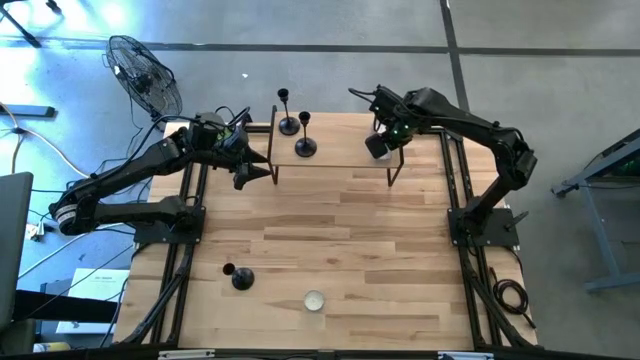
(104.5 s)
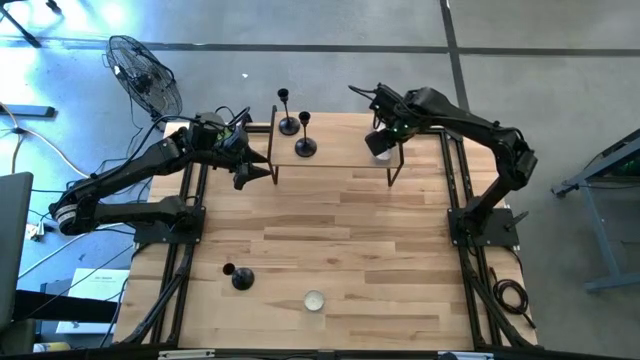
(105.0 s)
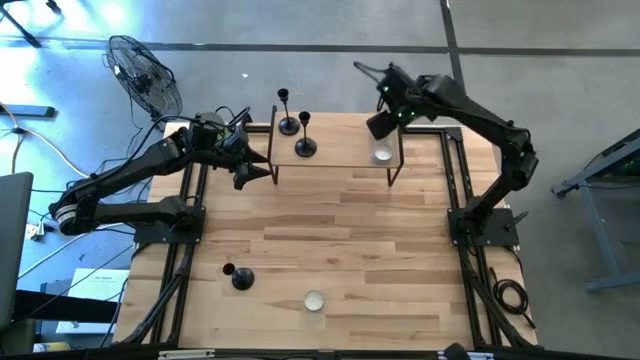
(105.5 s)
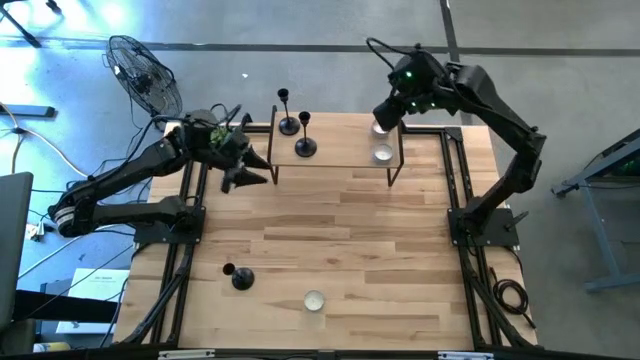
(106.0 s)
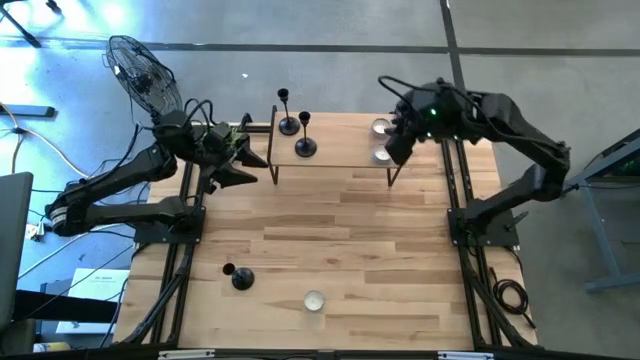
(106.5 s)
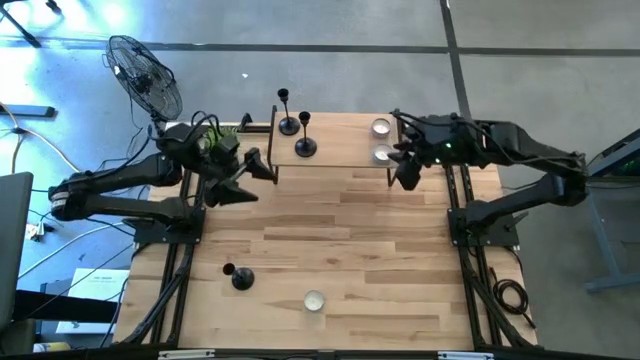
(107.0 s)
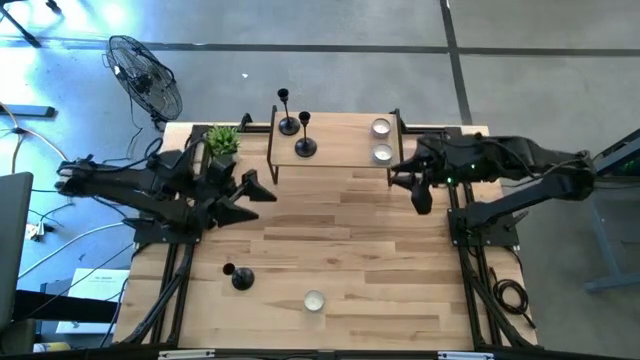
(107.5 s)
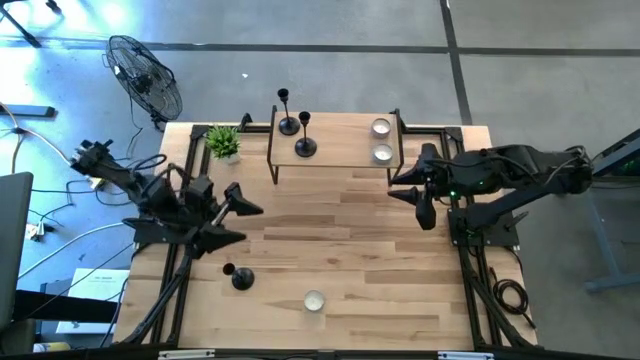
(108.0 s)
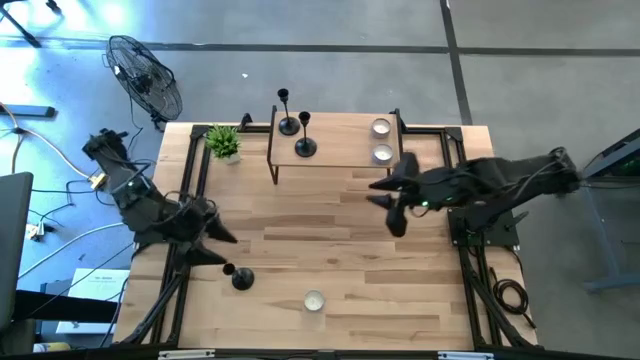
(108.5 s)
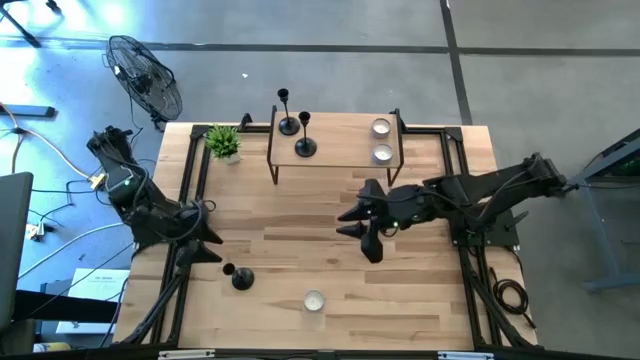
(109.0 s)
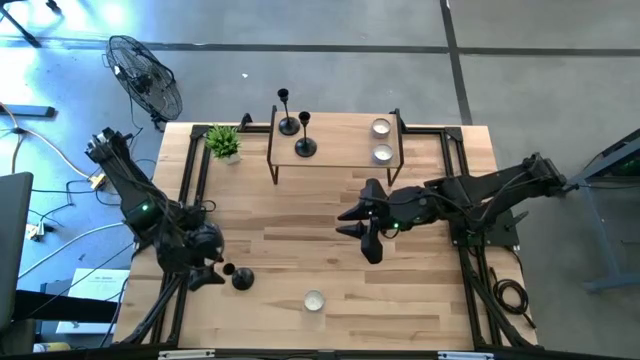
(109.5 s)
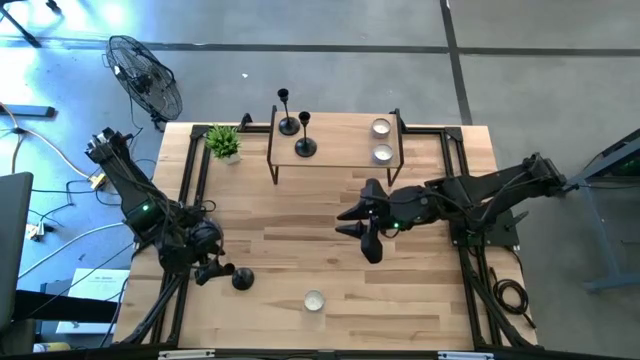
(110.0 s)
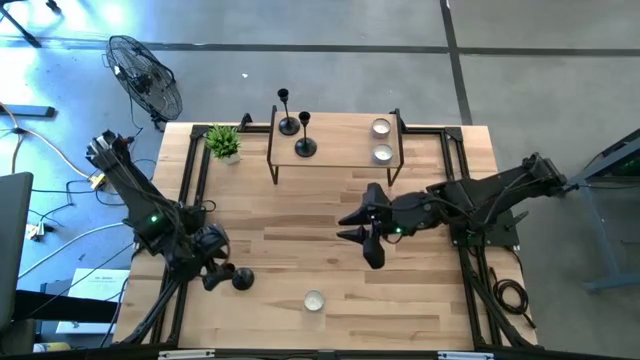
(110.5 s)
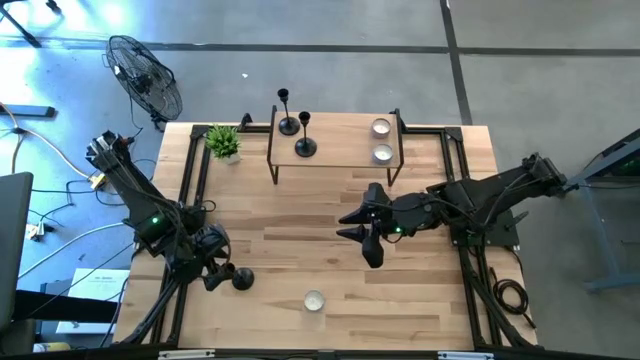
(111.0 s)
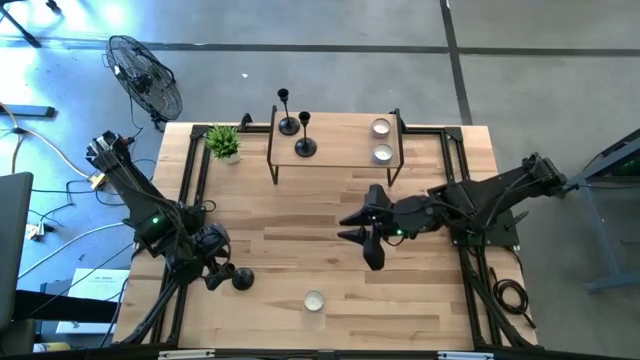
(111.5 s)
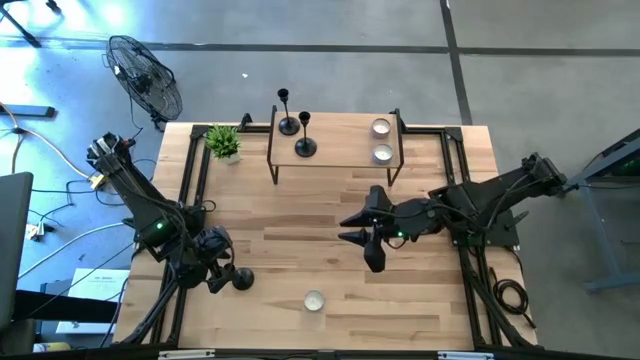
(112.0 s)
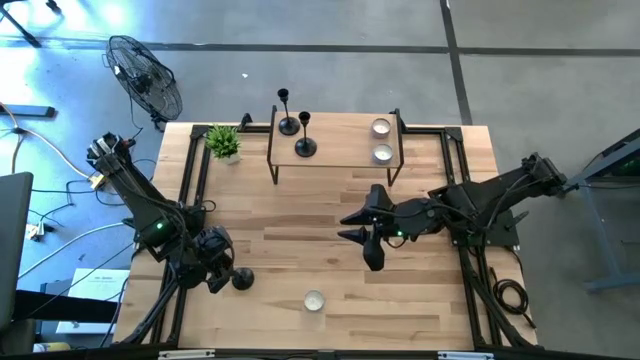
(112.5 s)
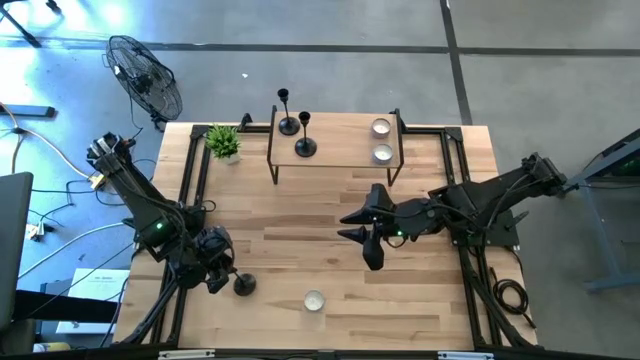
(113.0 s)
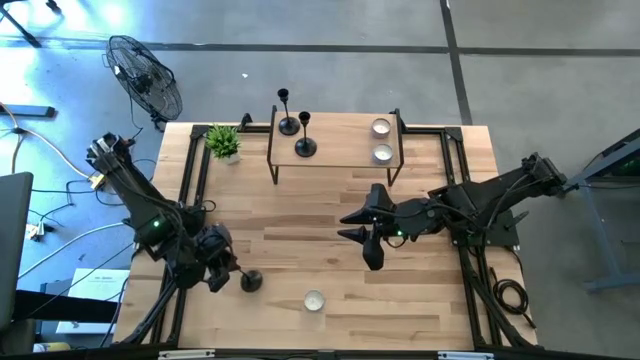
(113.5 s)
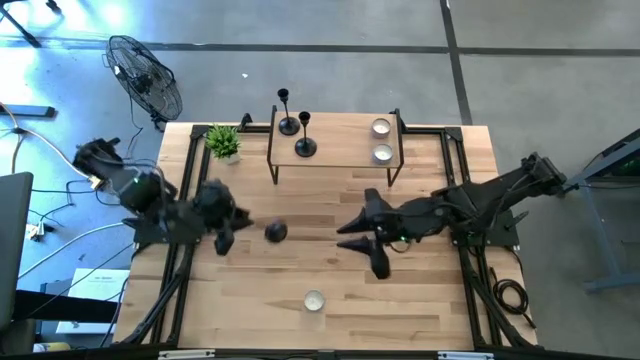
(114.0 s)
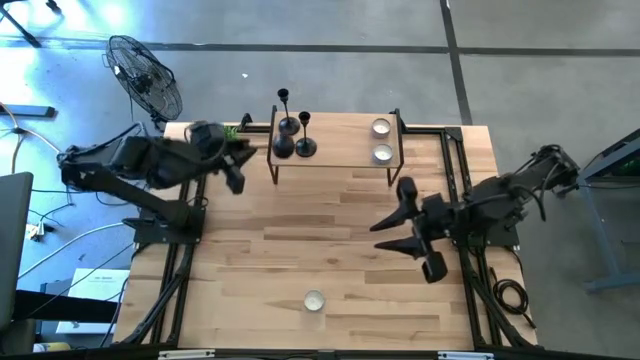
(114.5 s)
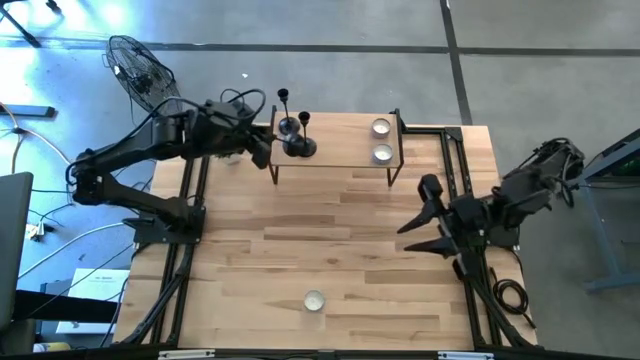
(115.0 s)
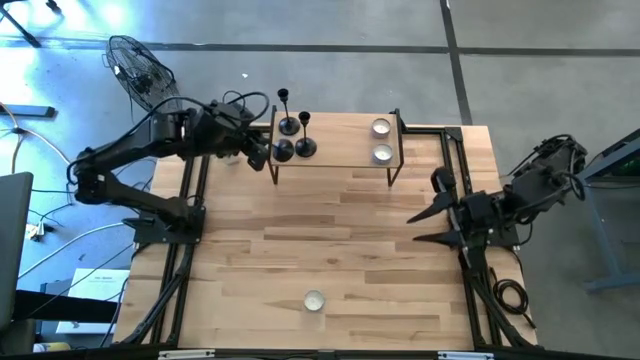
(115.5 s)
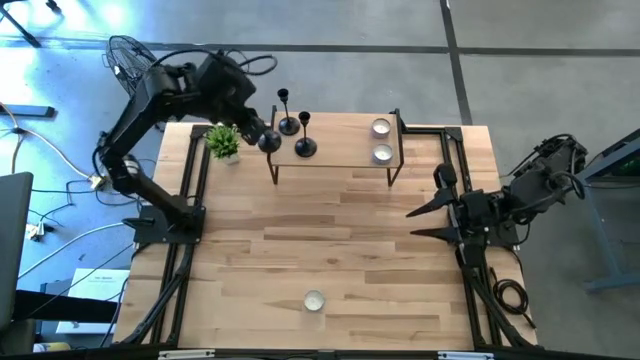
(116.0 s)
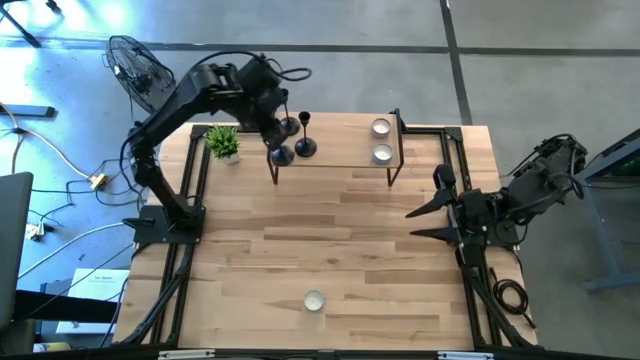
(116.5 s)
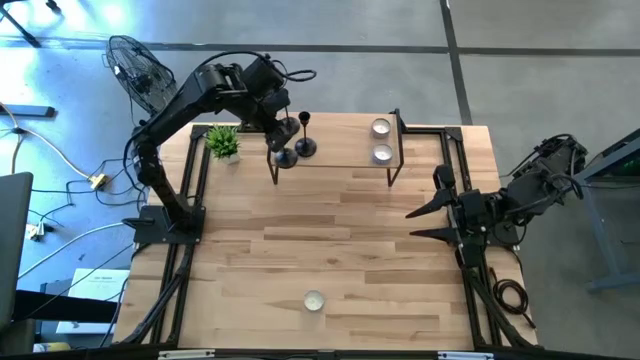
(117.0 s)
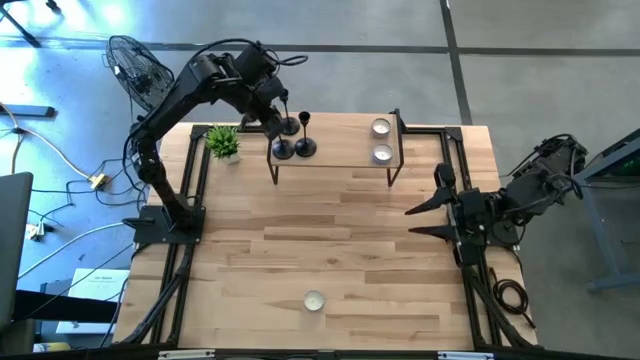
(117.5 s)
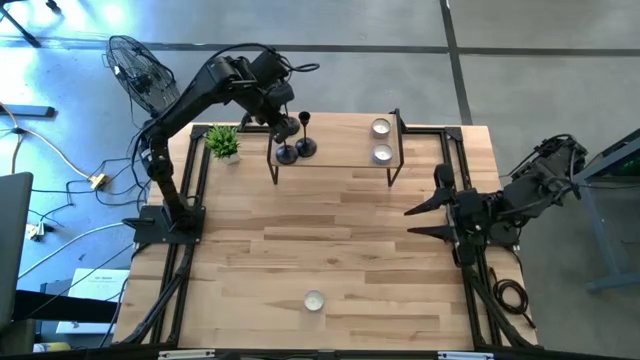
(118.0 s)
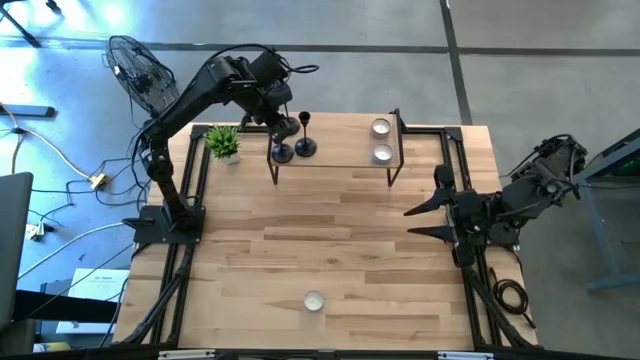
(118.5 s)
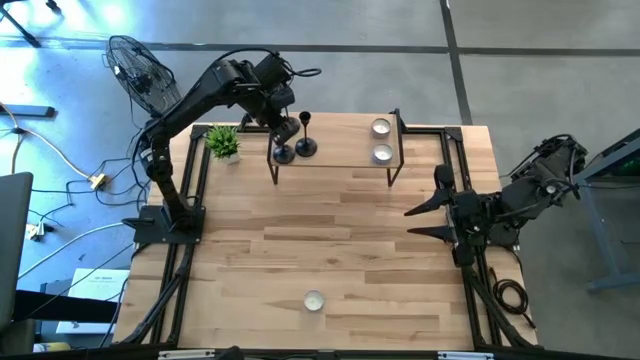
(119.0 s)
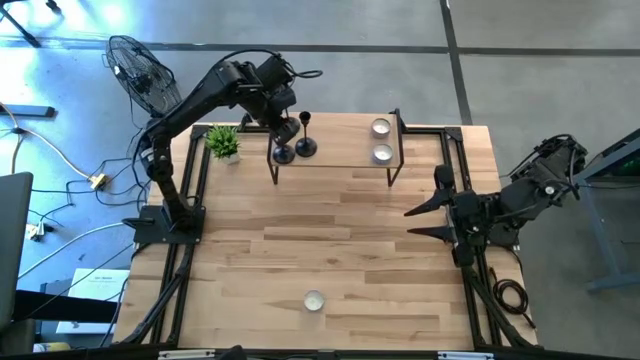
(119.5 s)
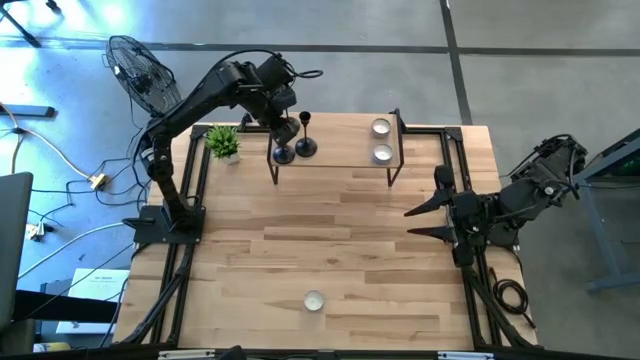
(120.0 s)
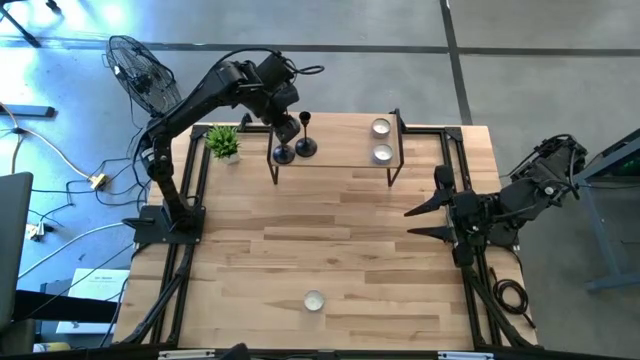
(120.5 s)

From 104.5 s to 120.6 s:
Task: Pick & Place candle stick holders
Put the candle holder on the shelf

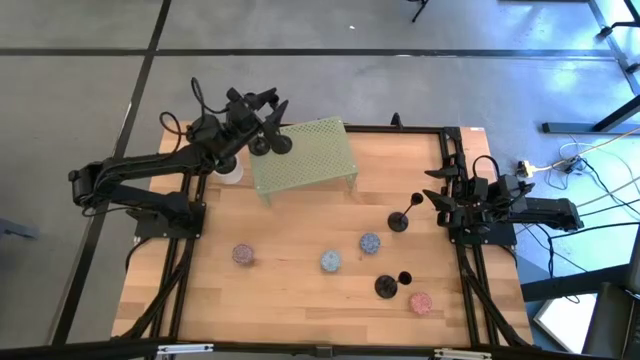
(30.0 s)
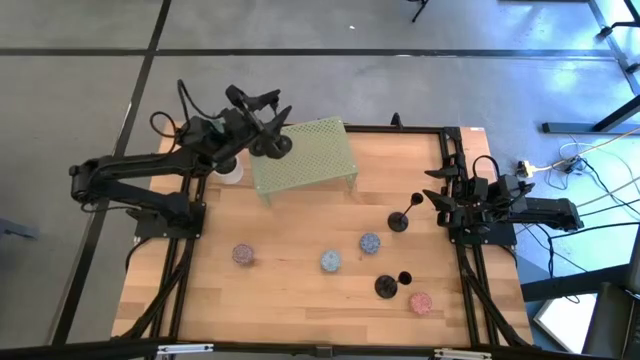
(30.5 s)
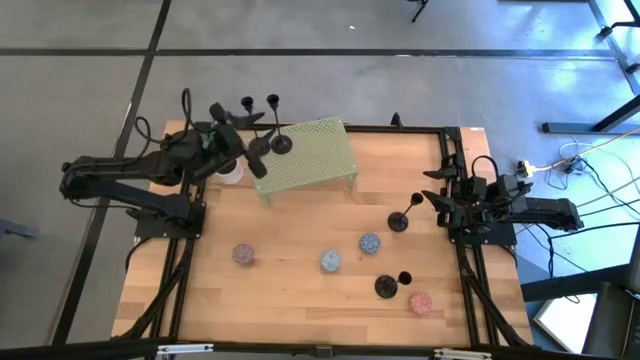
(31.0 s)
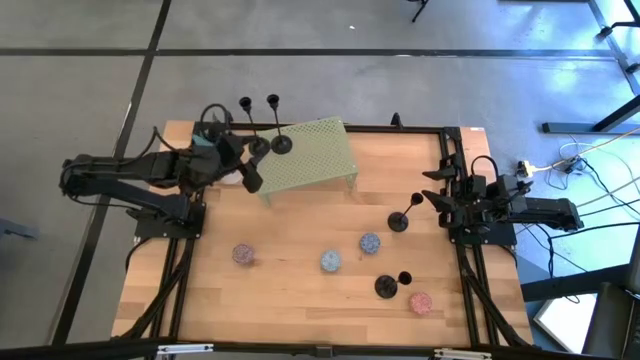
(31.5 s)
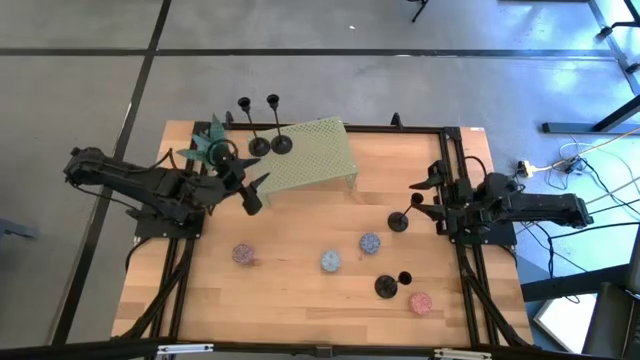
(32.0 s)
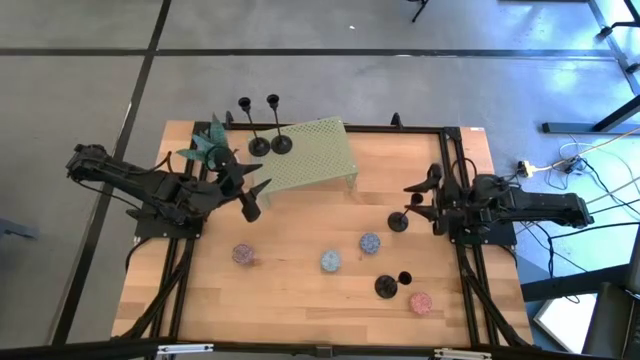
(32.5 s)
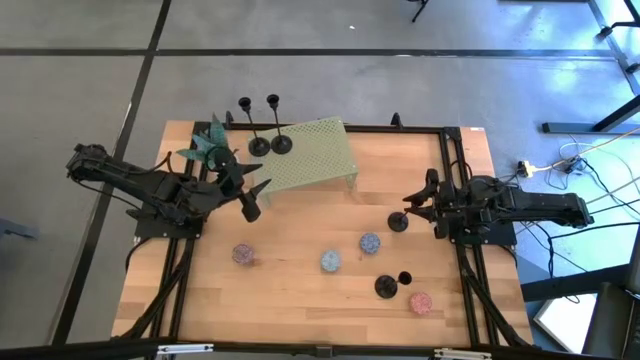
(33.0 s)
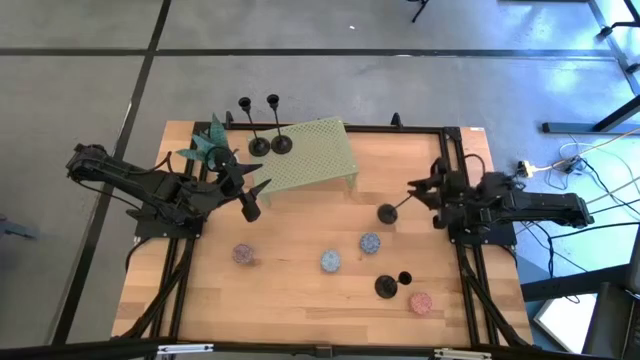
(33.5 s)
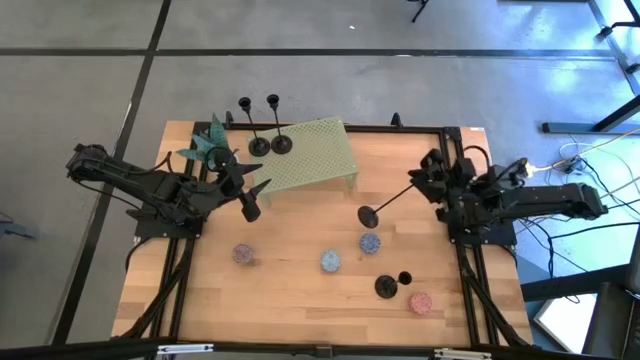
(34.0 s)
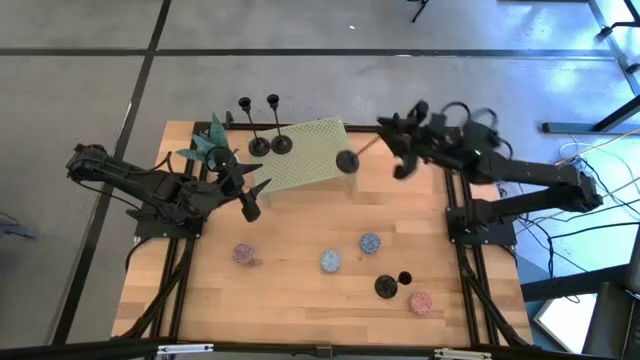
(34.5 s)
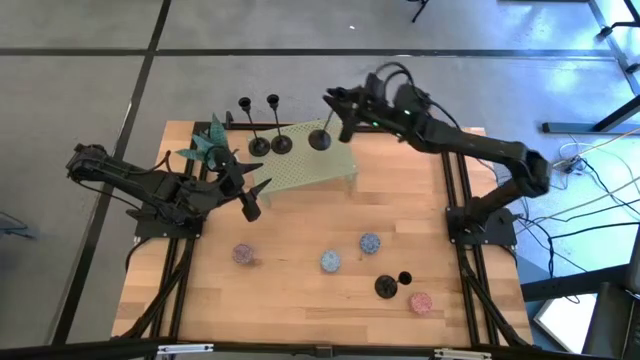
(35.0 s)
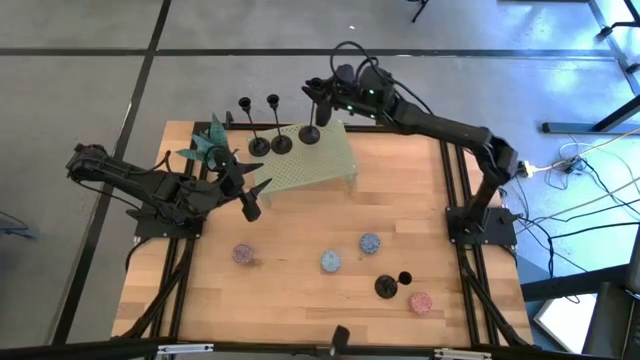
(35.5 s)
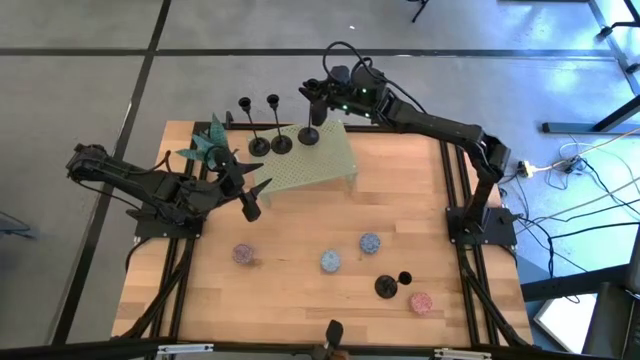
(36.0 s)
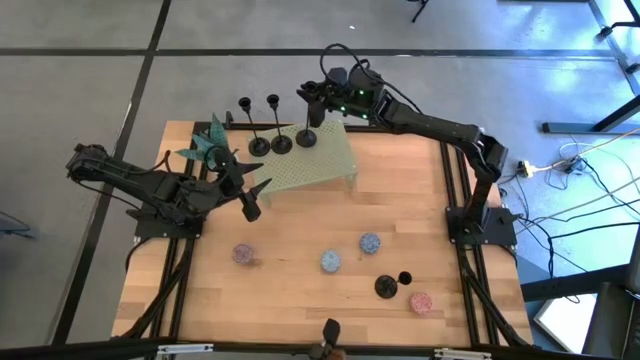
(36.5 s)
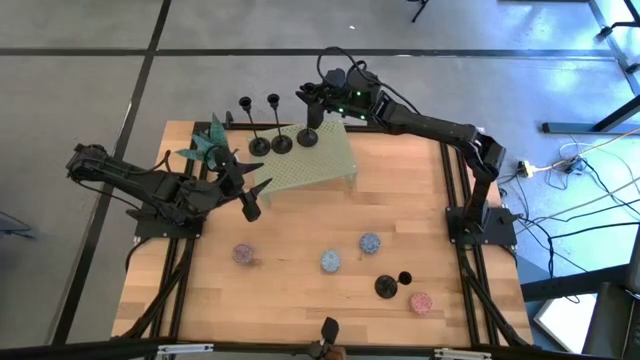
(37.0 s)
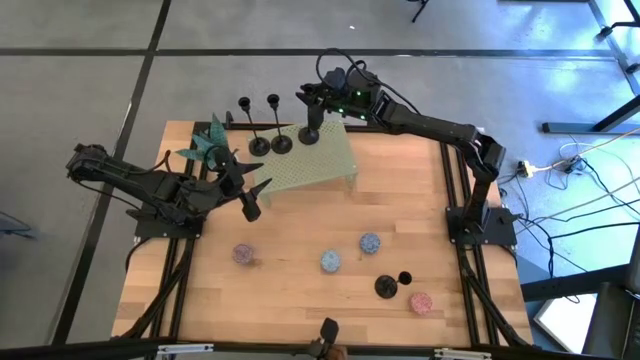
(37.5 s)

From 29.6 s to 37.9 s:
Task: Pick & Place candle stick holders
Put the black candle holder on the shelf
